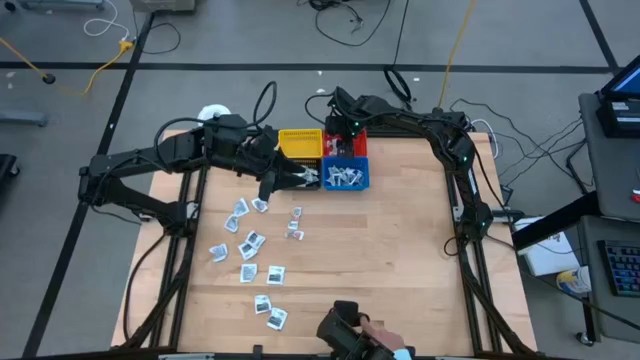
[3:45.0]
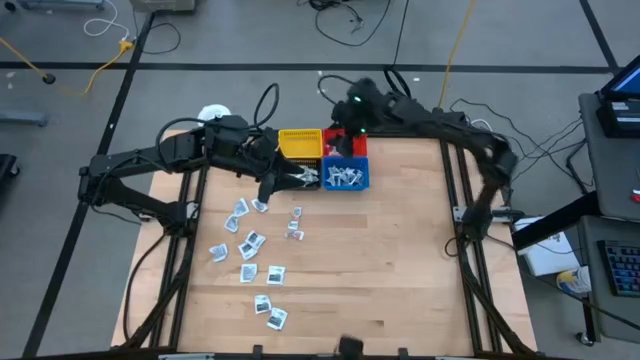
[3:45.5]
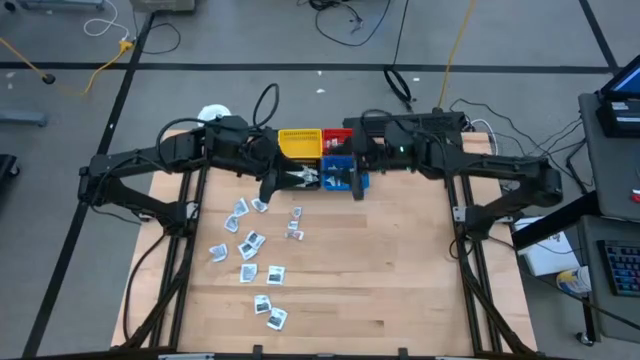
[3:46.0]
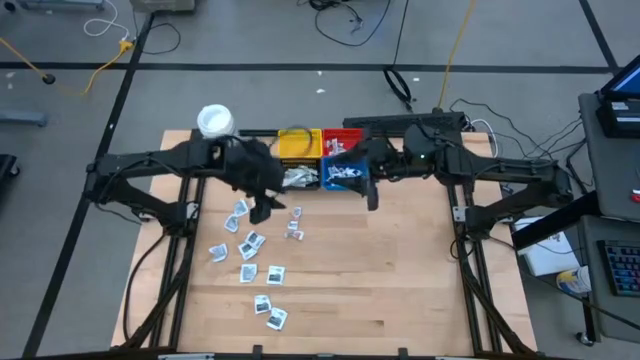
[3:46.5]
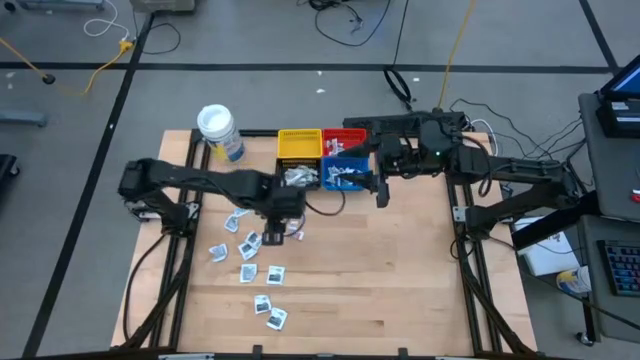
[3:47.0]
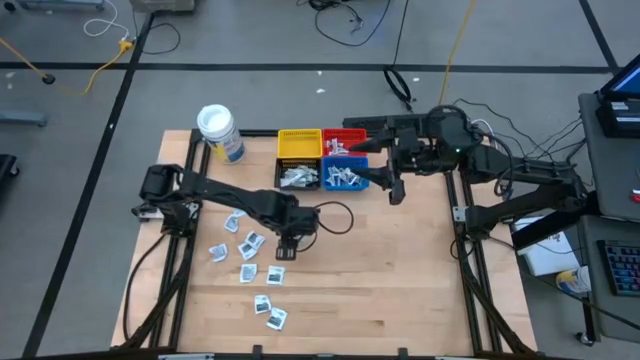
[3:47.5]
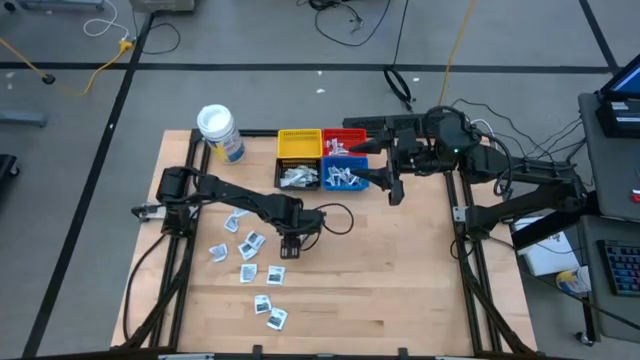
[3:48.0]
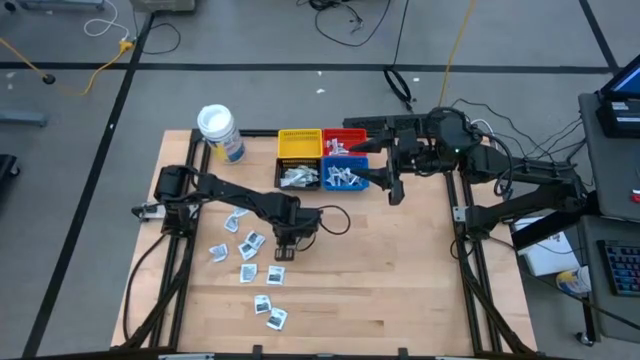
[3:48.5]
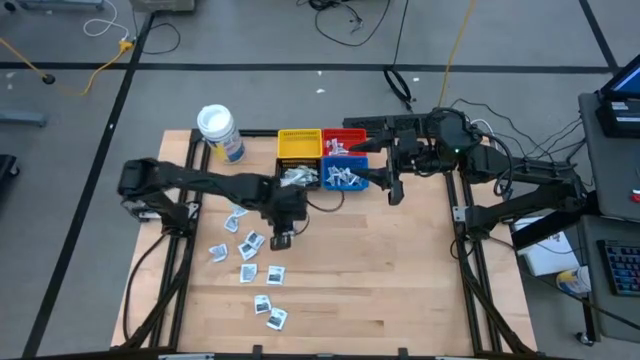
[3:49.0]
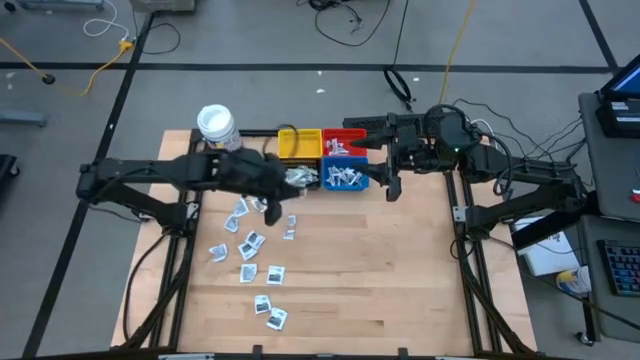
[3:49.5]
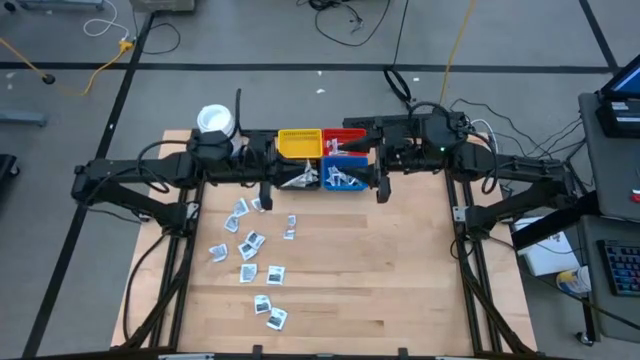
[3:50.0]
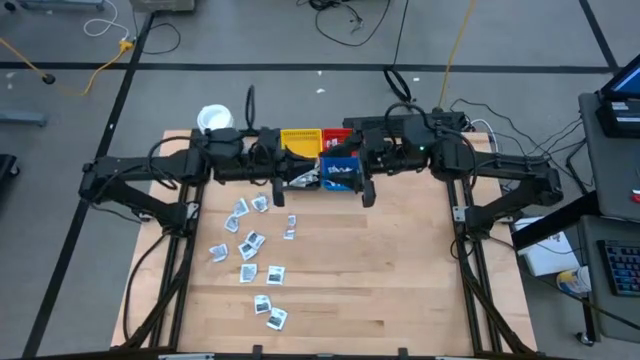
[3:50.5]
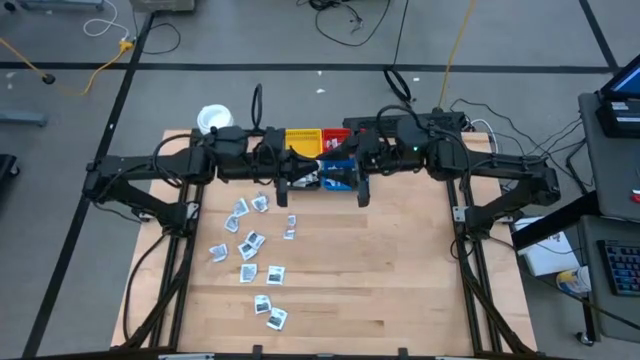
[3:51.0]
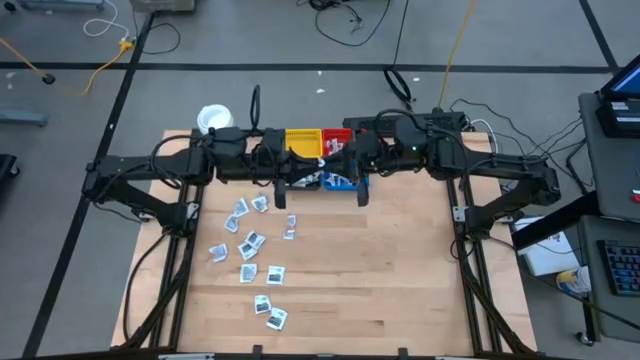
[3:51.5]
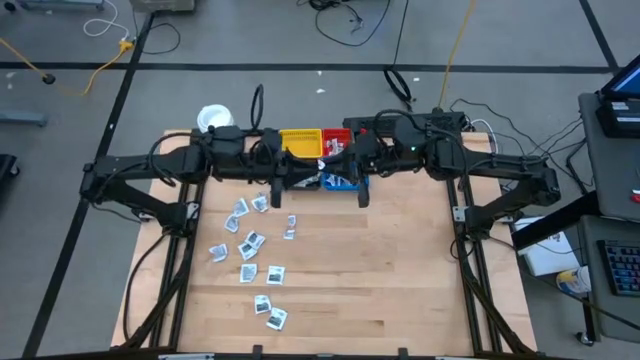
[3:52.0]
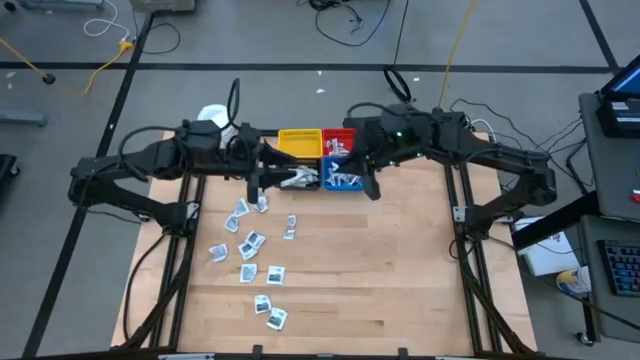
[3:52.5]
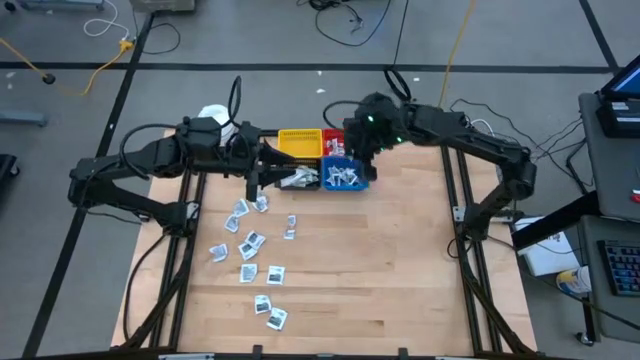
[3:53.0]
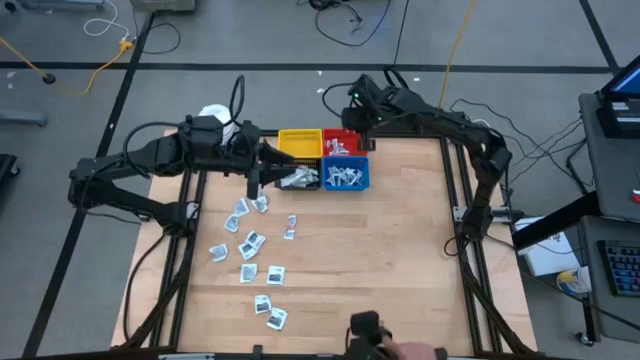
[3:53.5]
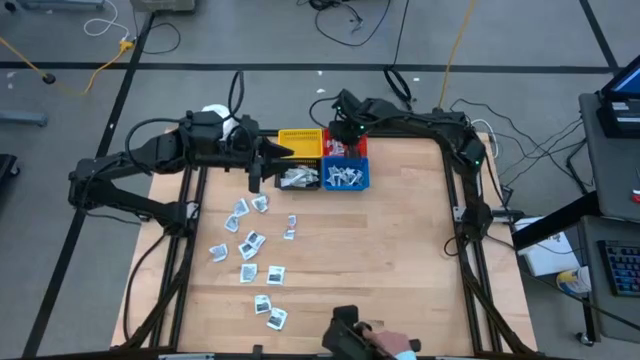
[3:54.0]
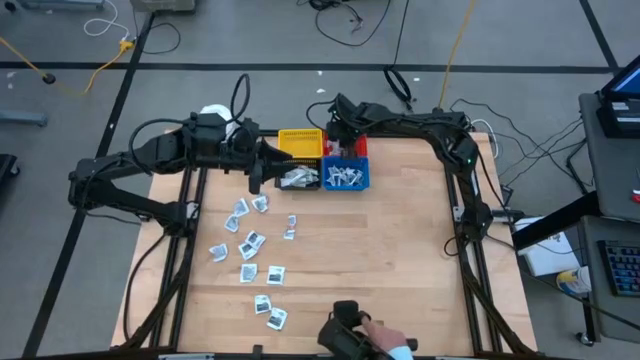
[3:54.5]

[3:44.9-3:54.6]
Task: Pick & Place First Aid Supplies
Put the orange ointment pack into the red basket

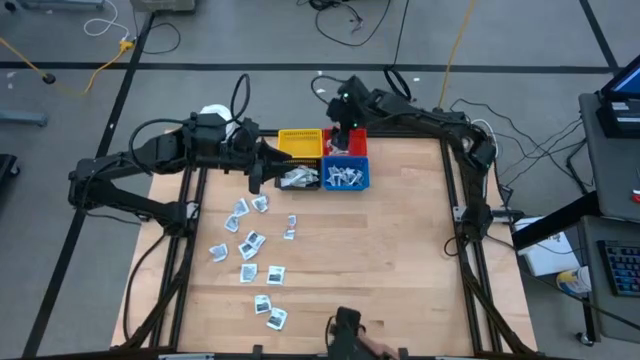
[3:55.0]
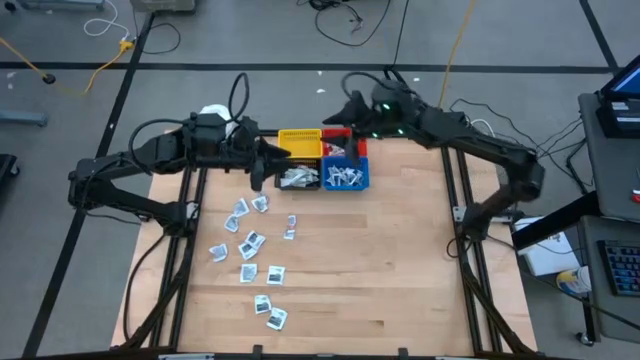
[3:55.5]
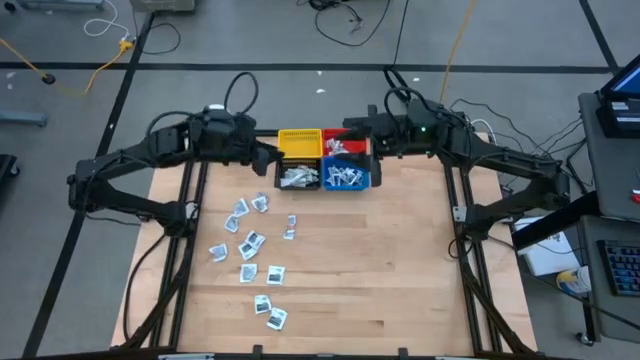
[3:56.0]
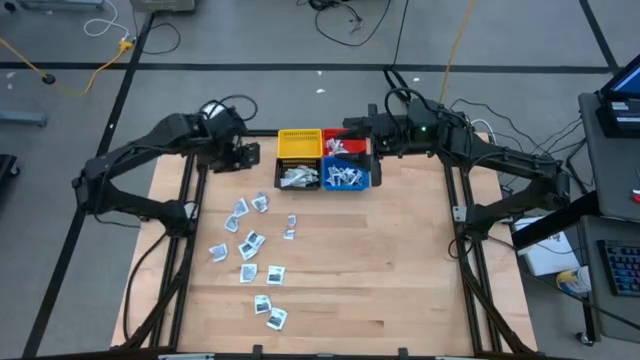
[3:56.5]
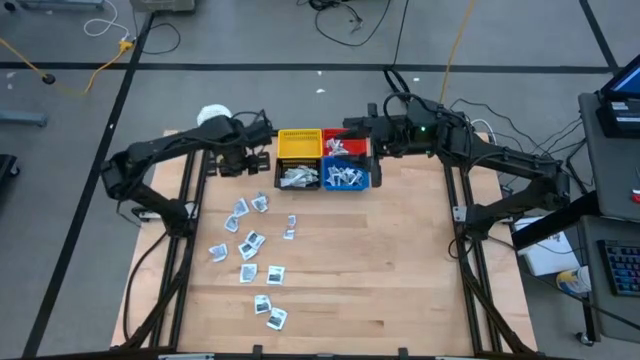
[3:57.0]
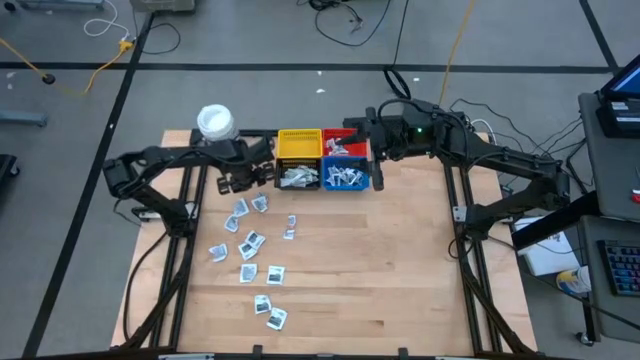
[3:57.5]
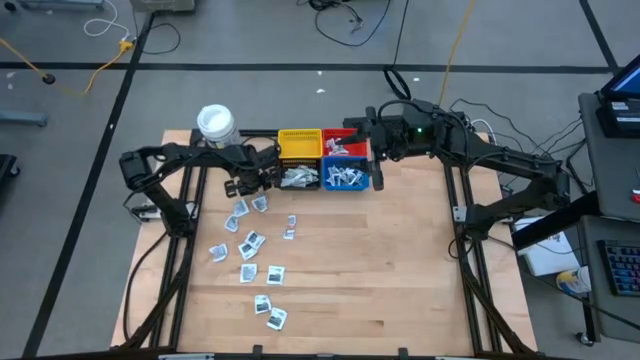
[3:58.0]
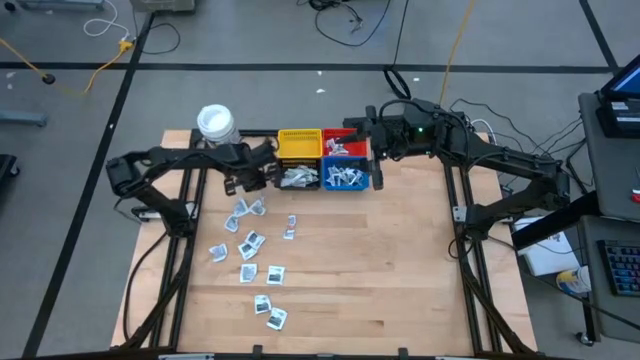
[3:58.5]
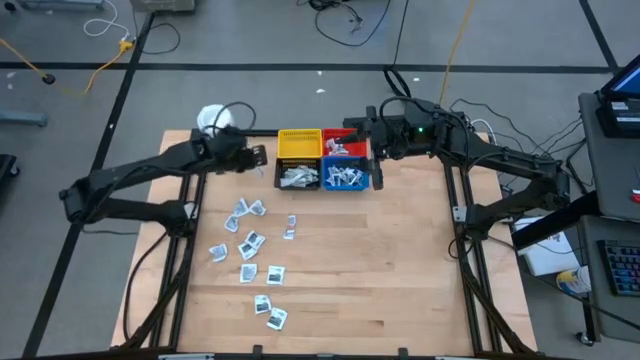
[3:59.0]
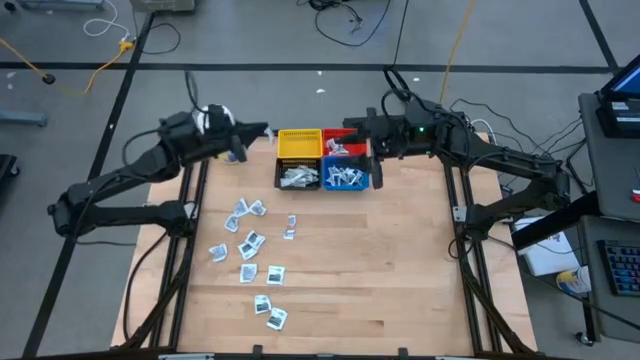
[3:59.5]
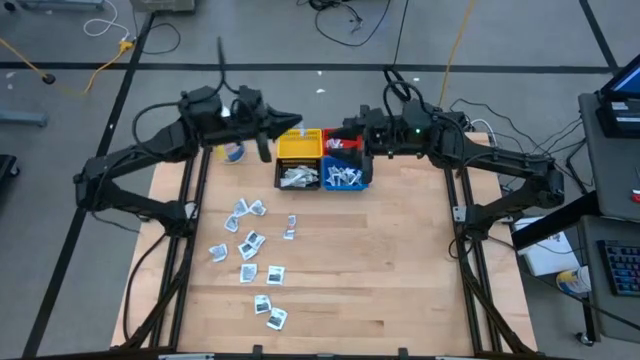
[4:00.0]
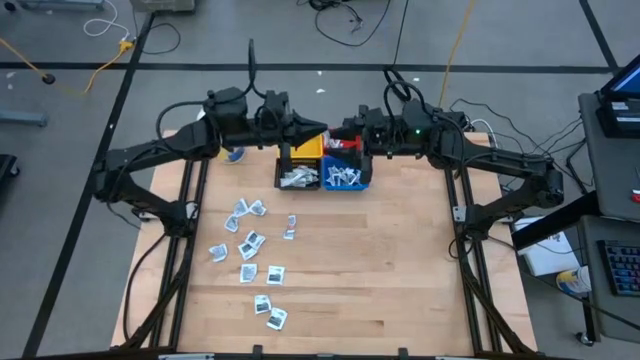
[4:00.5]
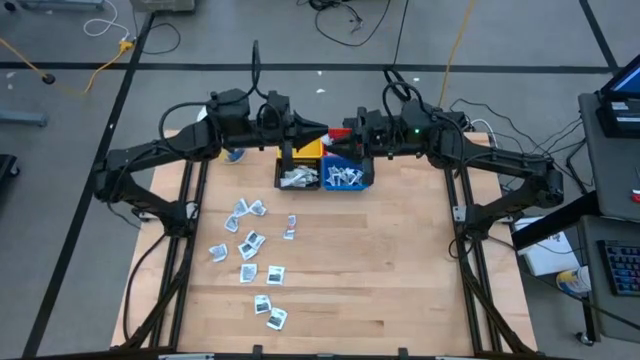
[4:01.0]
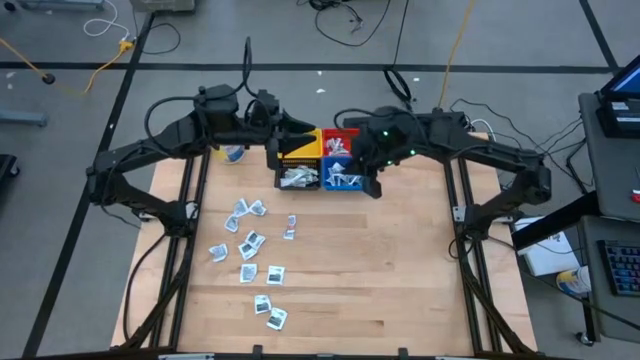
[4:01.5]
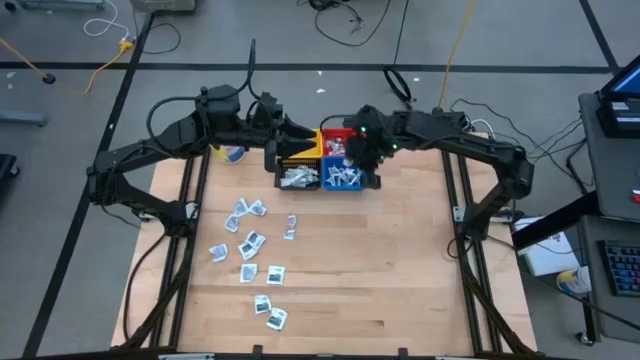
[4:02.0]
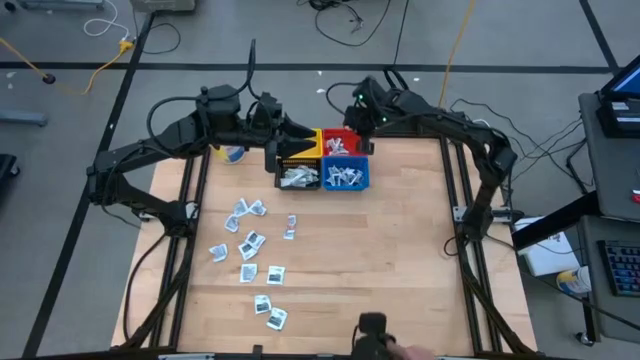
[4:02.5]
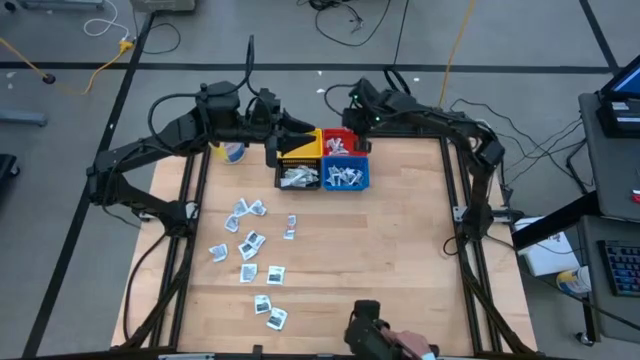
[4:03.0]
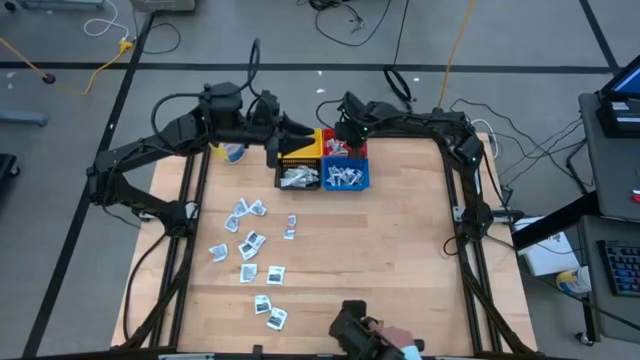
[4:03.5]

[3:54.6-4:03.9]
Put the orange ointment pack into the red basket

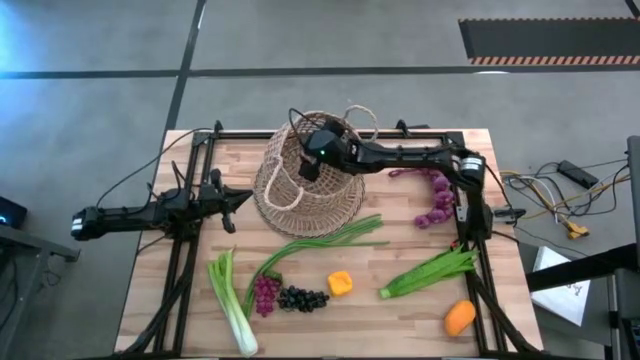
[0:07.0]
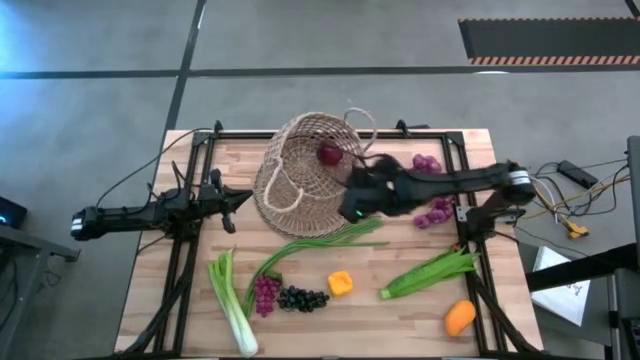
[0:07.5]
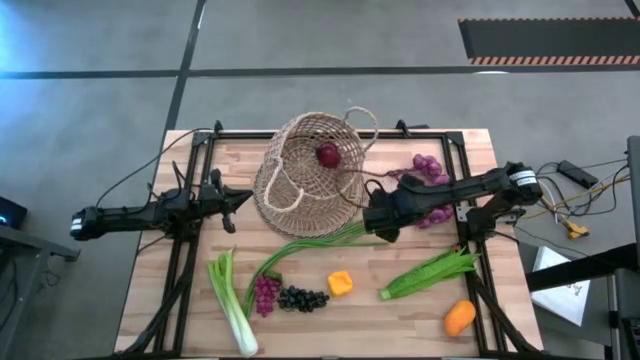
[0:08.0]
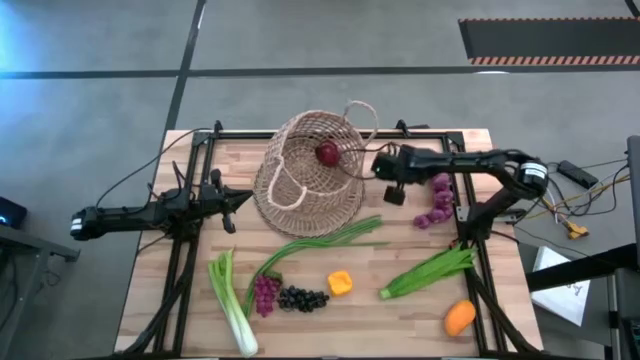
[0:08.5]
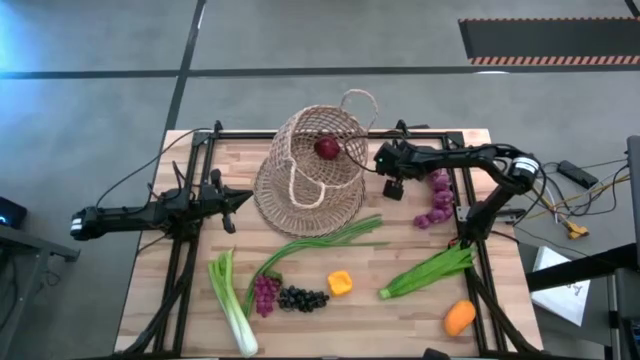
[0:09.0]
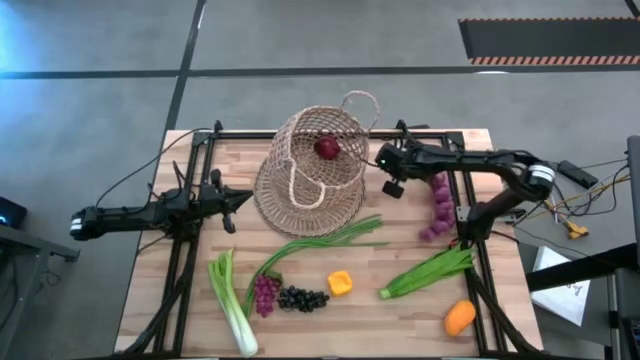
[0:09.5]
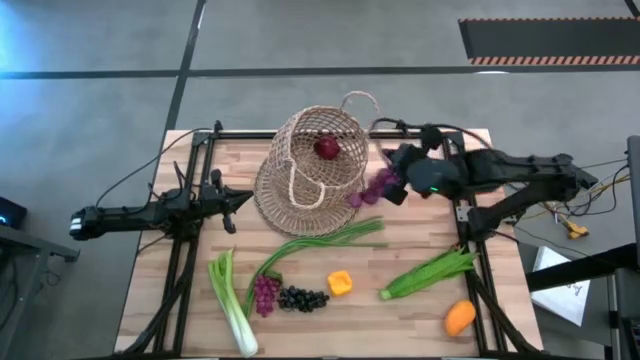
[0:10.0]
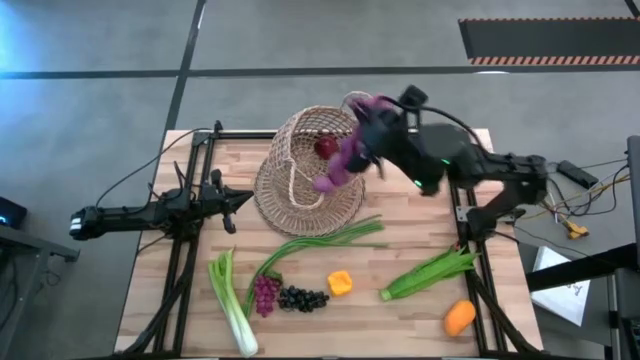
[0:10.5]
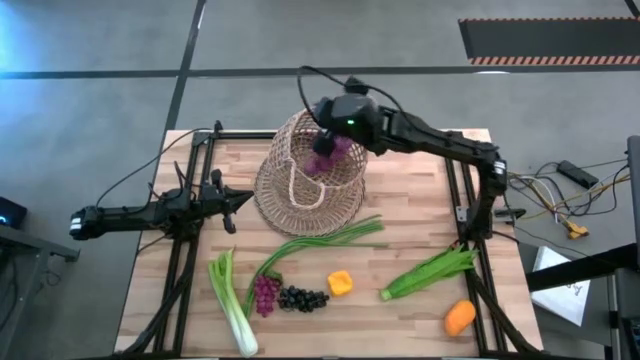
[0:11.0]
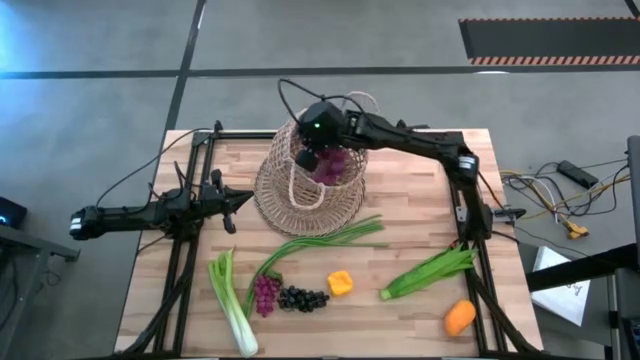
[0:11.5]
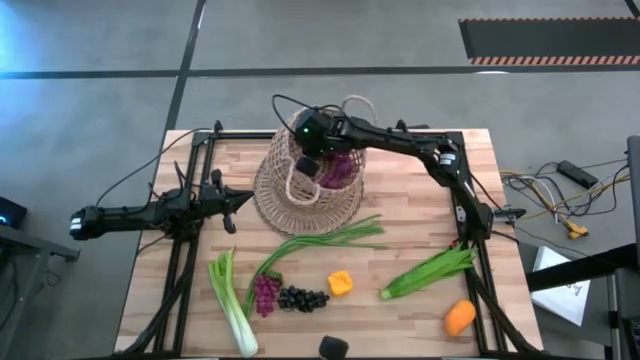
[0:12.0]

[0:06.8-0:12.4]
Task: Build produce basket
Put the purple garlic into the brown basket
